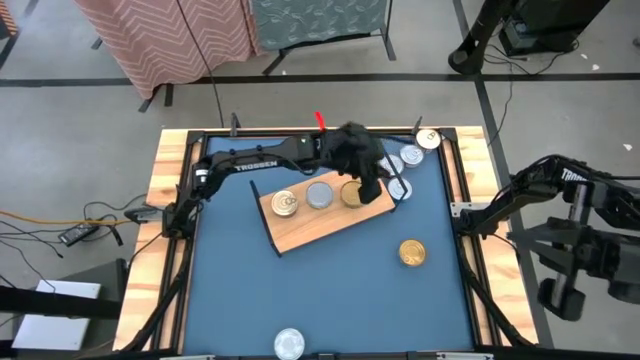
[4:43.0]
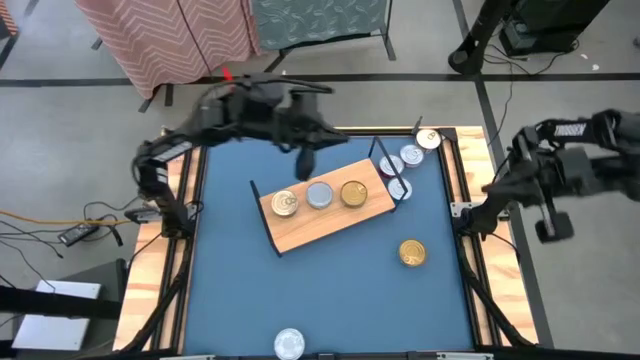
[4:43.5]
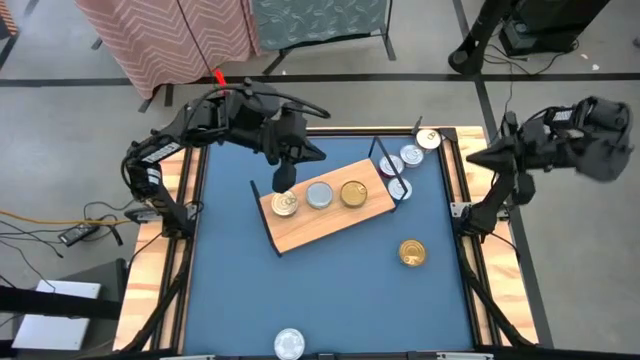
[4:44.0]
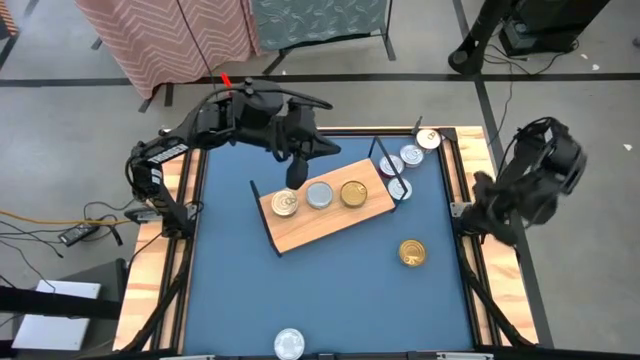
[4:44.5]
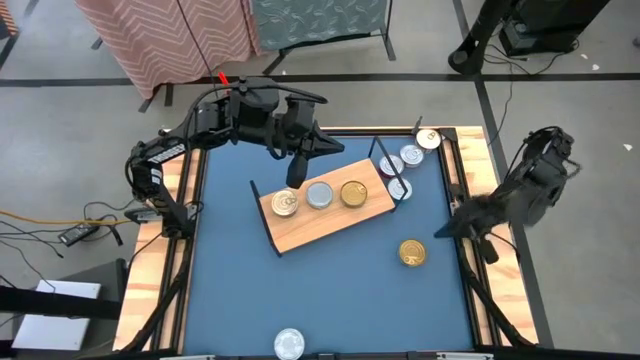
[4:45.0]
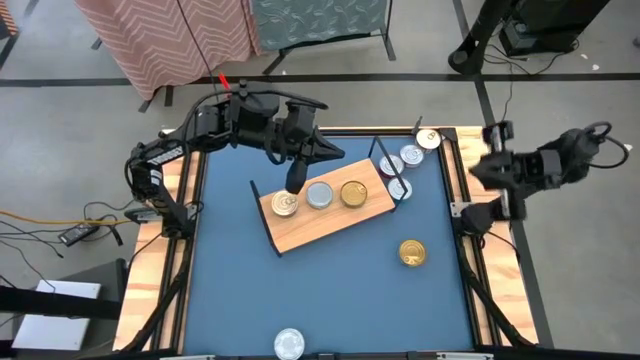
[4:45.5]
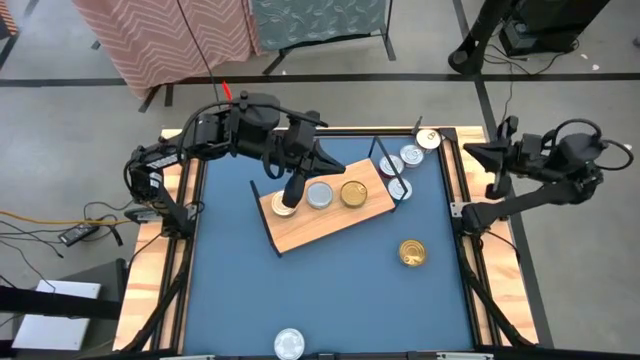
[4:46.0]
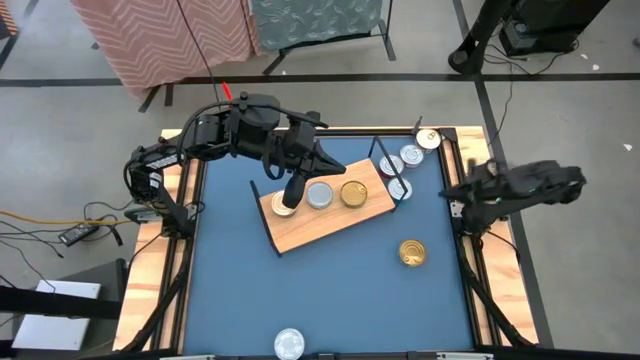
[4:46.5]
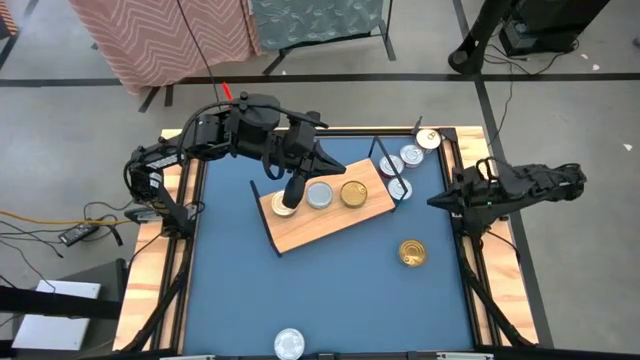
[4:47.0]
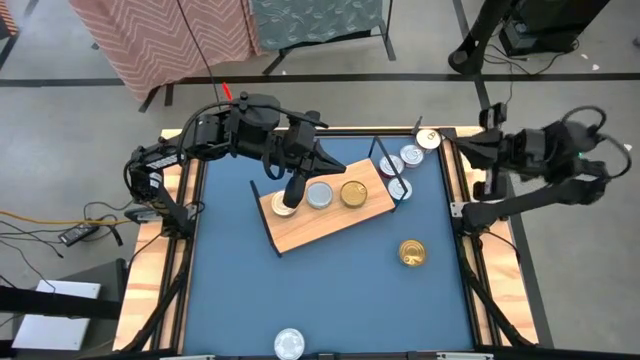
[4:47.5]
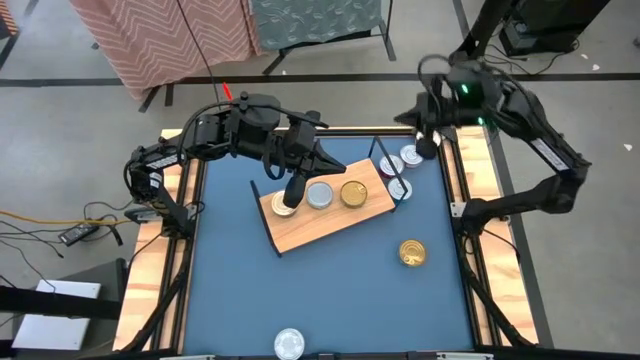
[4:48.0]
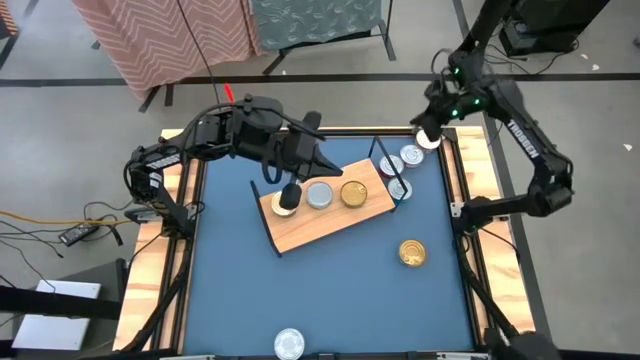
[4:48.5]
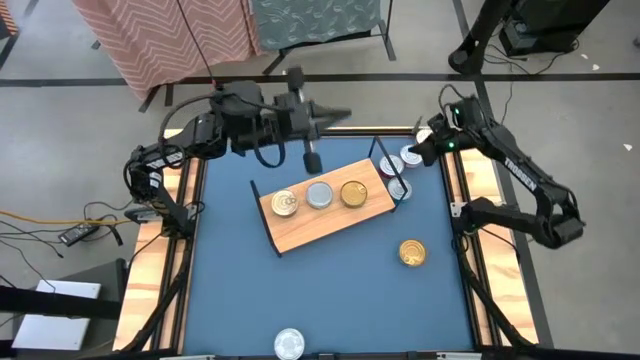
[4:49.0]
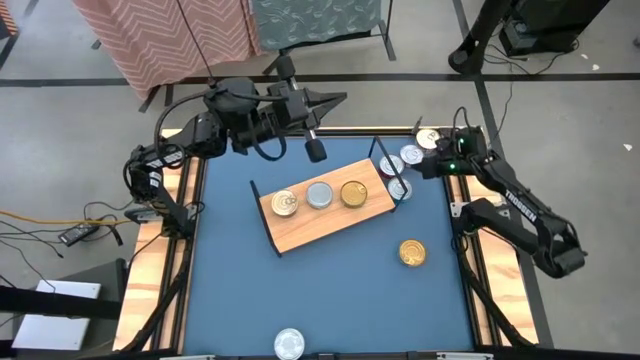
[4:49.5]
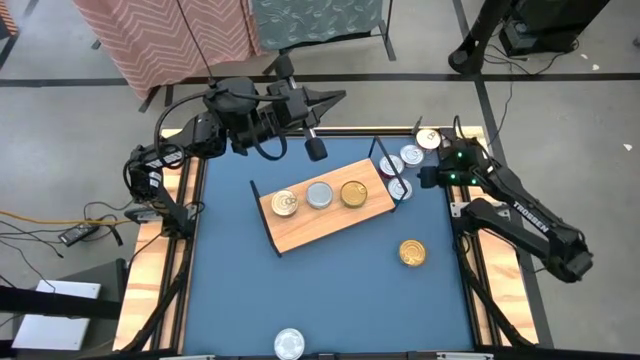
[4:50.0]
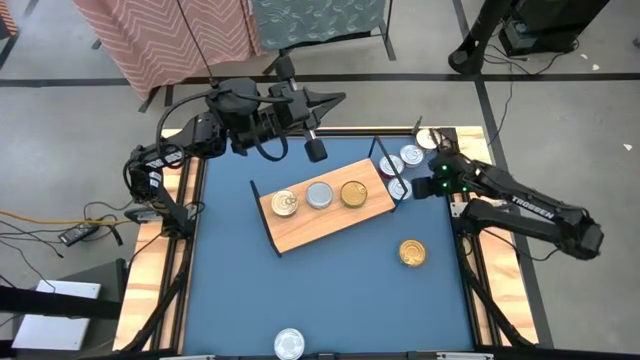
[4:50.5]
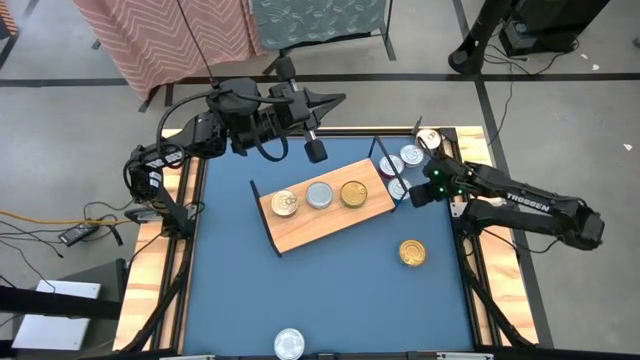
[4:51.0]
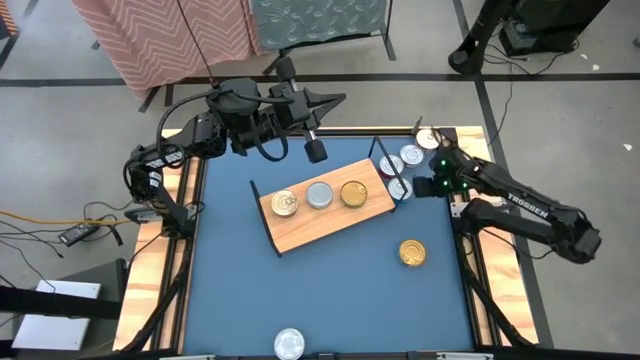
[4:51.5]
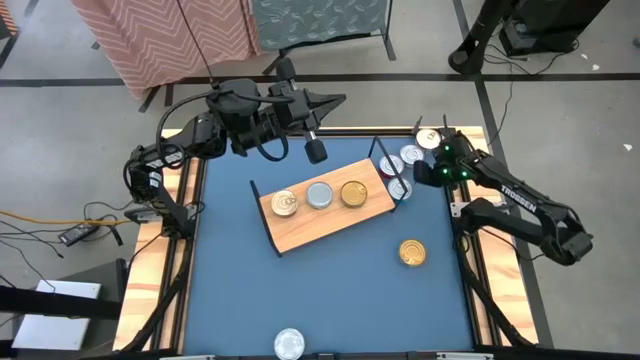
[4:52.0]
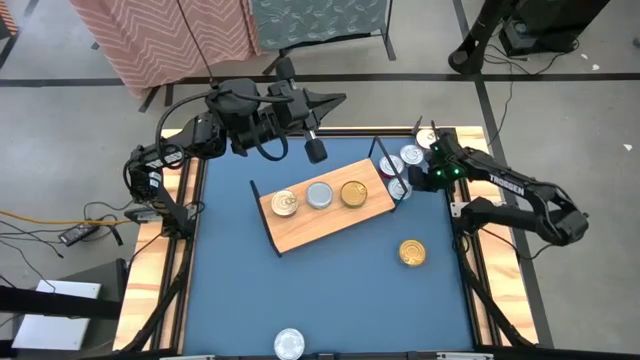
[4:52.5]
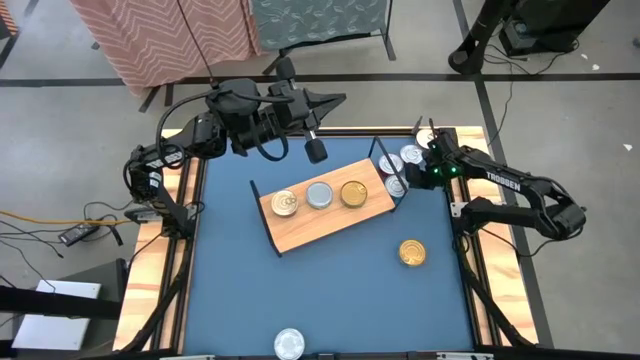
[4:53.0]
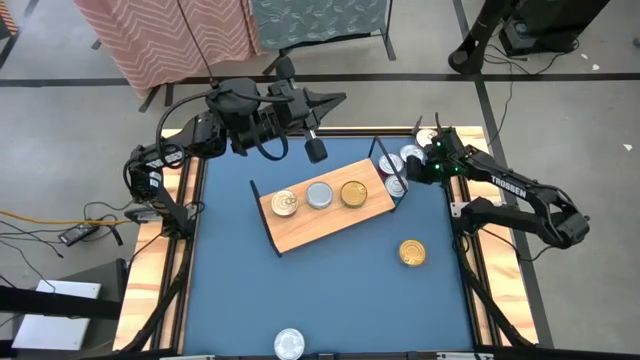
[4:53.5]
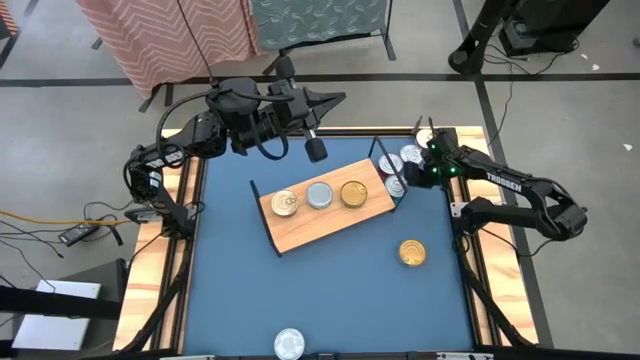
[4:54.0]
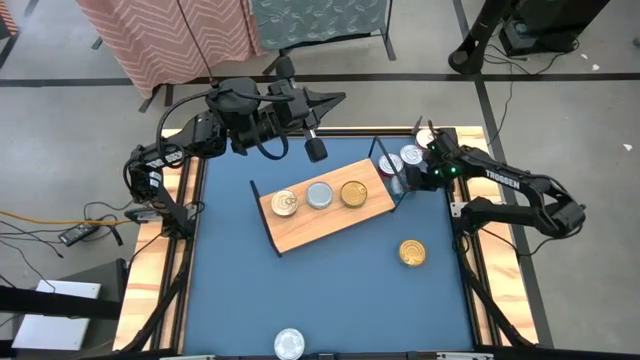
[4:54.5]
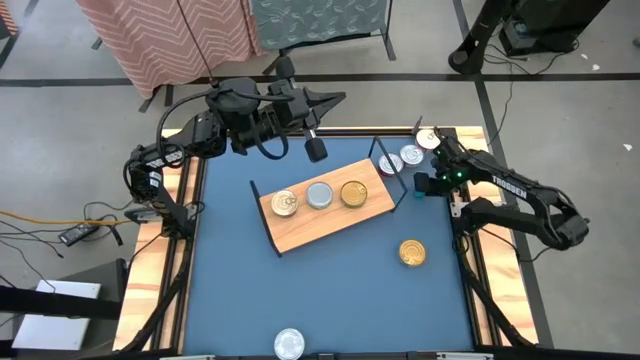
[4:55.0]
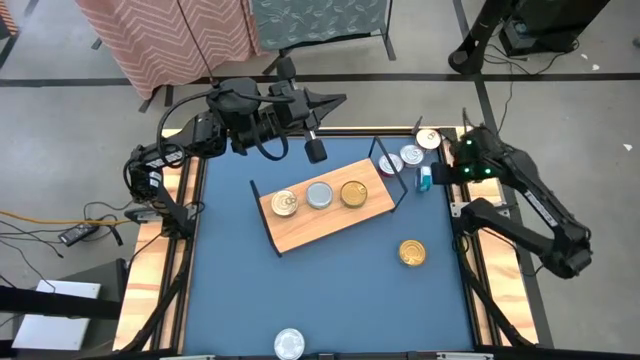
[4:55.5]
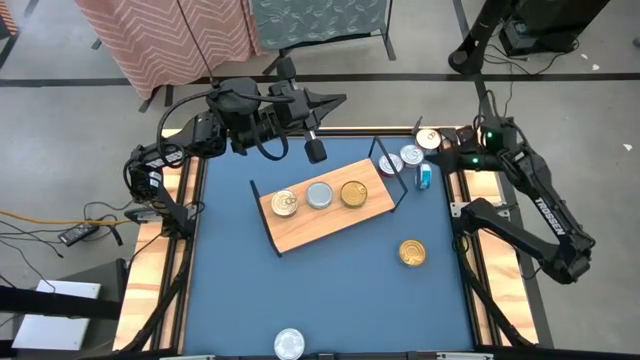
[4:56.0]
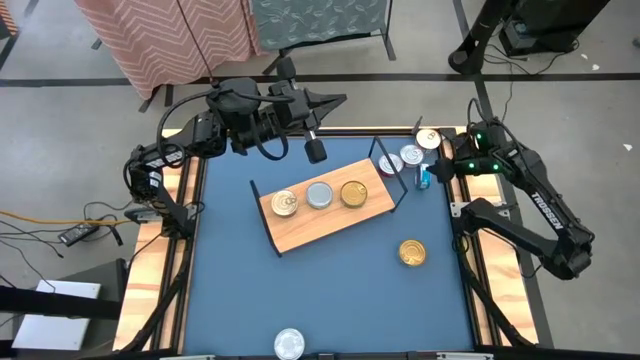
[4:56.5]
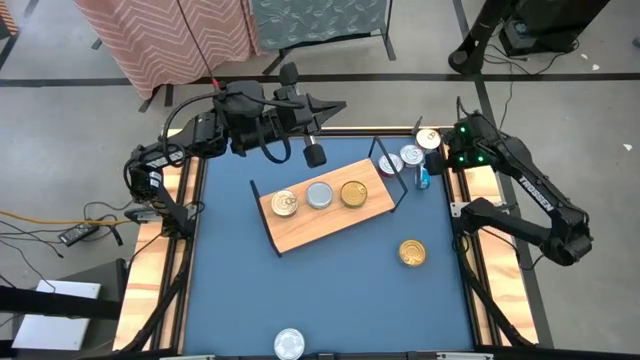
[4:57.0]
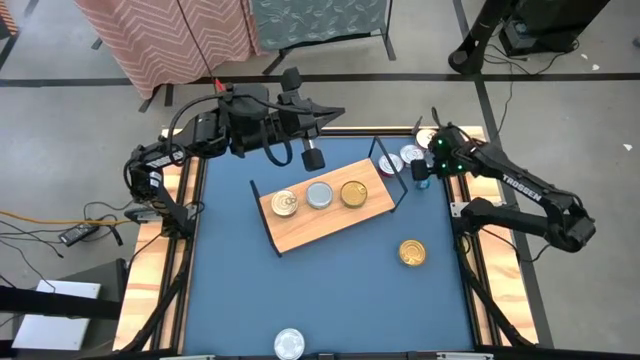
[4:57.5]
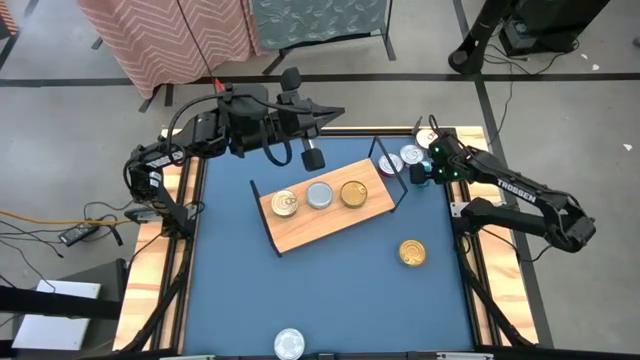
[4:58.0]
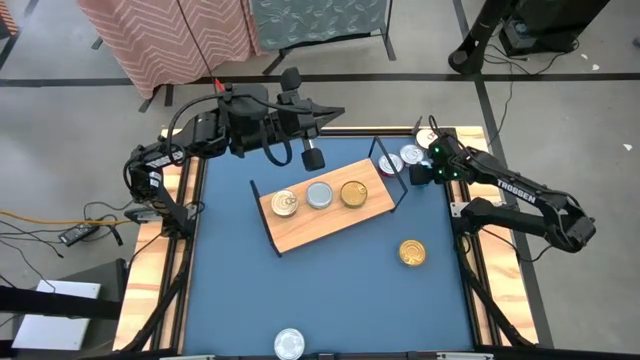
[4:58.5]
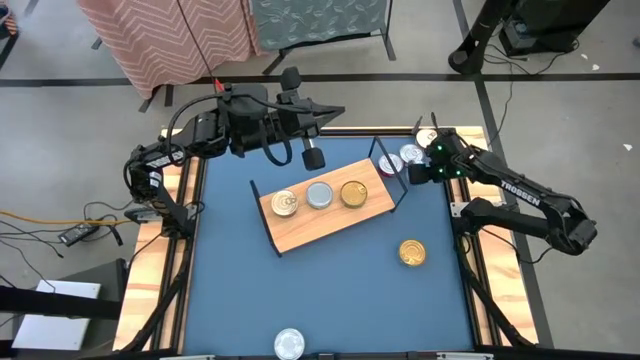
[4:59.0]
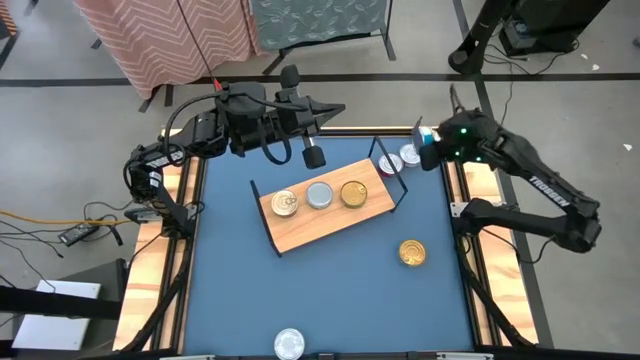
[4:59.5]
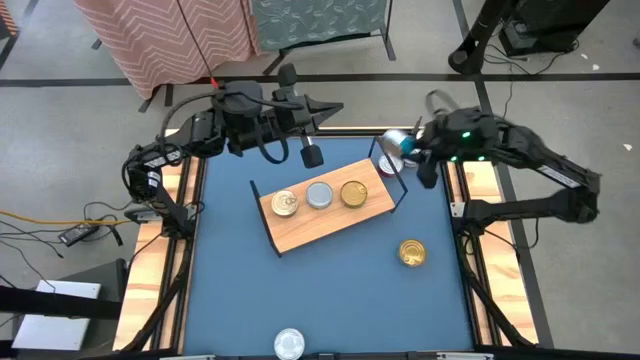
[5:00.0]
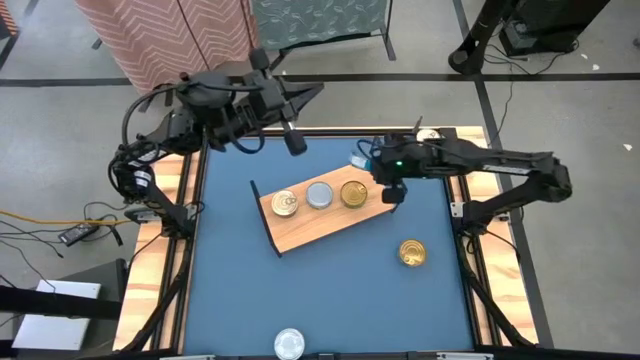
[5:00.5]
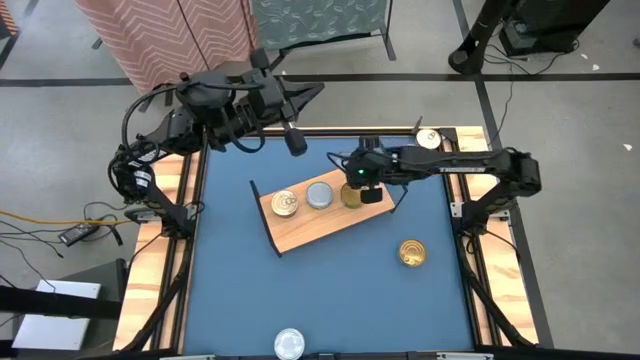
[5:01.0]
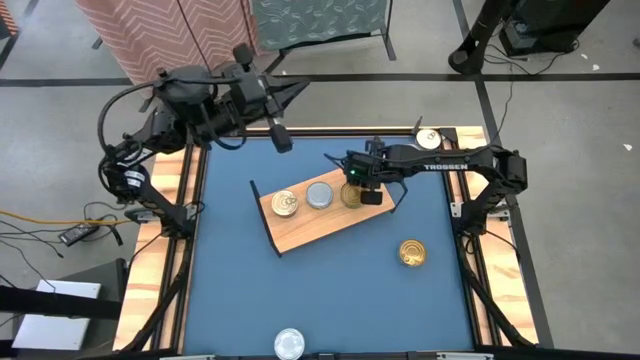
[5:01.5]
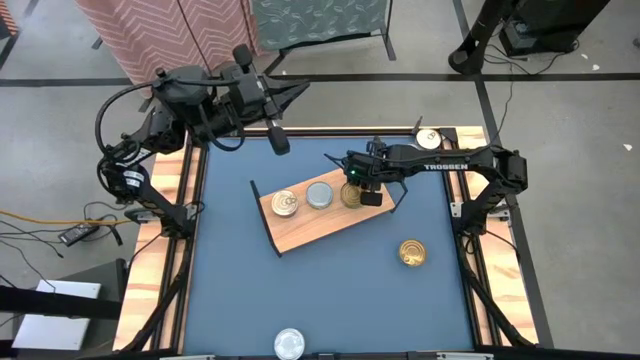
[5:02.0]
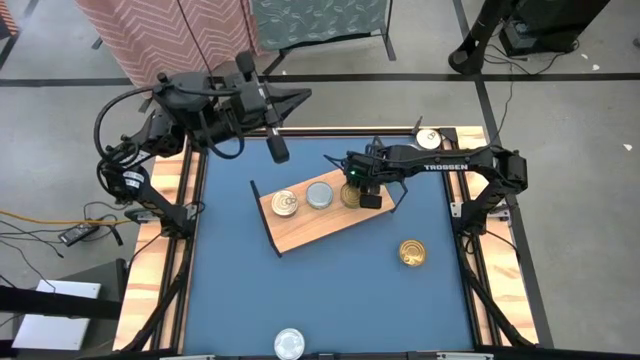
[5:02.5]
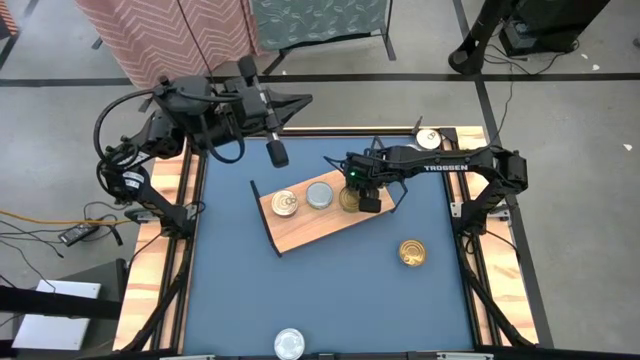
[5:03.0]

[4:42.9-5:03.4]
Task: Stack canned seafood by type on shelf
Put the yellow tuna can on the shelf
